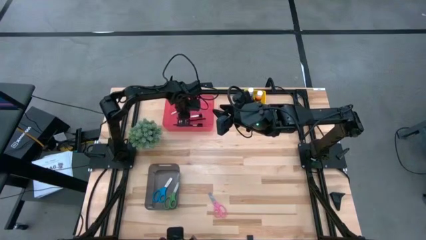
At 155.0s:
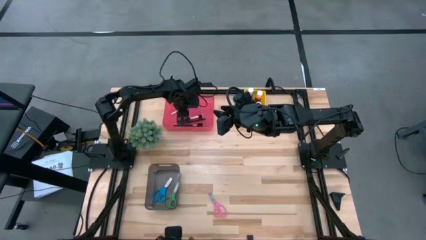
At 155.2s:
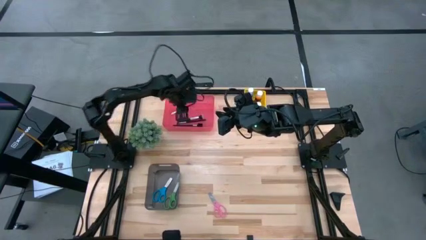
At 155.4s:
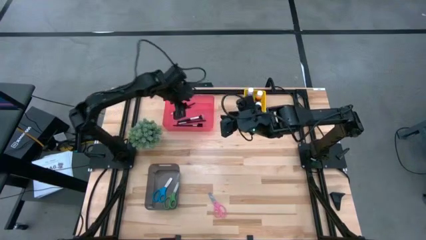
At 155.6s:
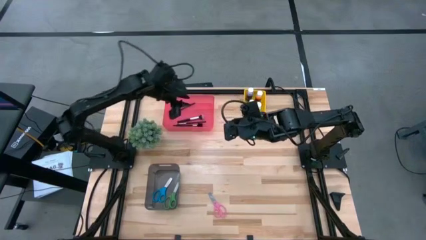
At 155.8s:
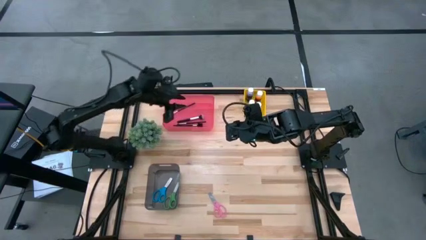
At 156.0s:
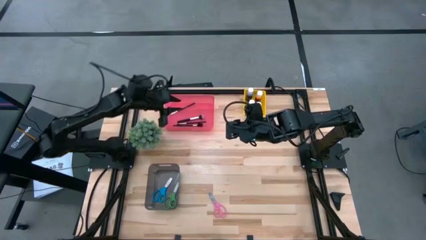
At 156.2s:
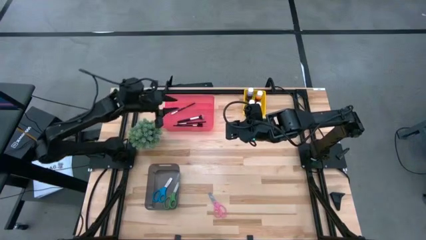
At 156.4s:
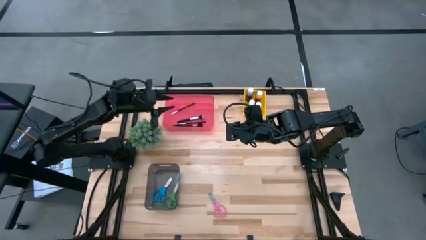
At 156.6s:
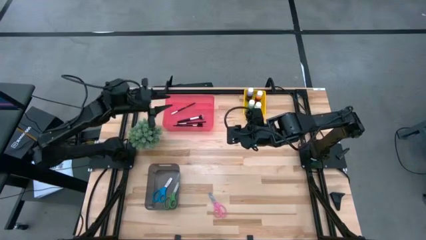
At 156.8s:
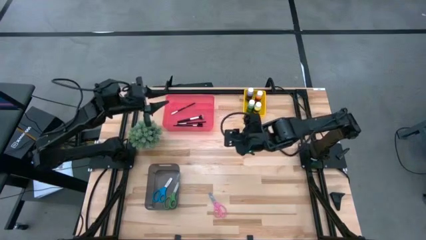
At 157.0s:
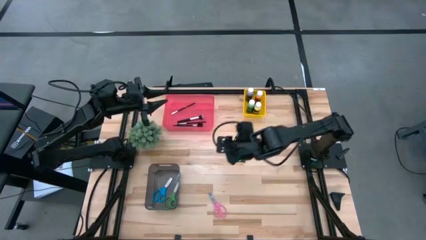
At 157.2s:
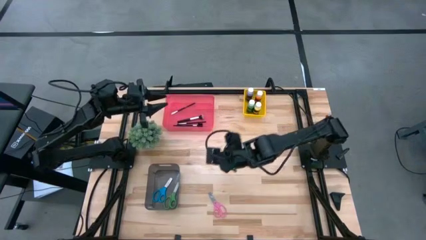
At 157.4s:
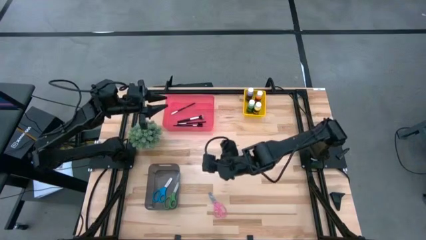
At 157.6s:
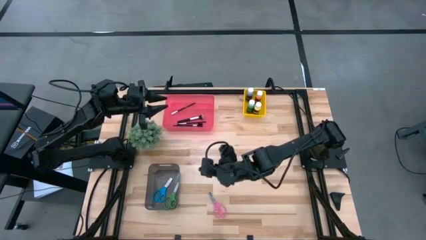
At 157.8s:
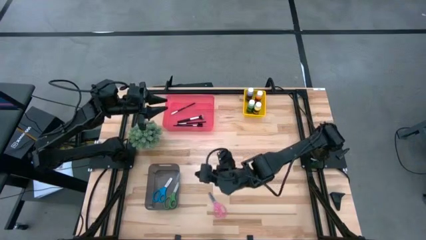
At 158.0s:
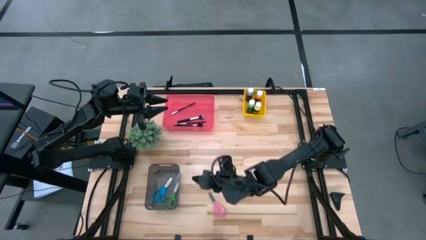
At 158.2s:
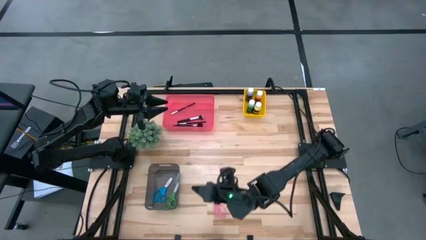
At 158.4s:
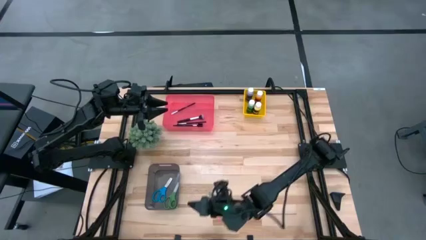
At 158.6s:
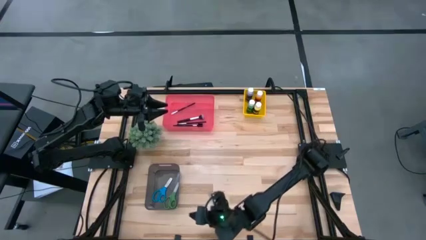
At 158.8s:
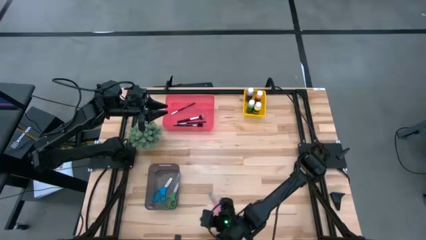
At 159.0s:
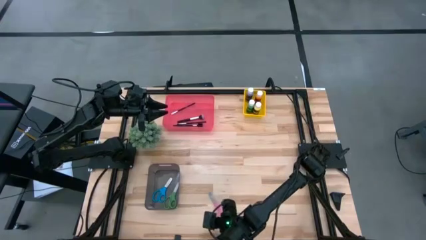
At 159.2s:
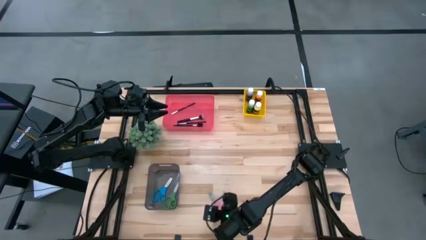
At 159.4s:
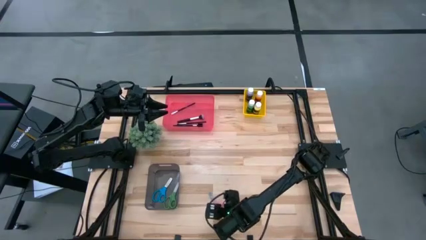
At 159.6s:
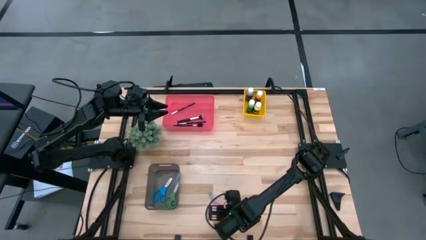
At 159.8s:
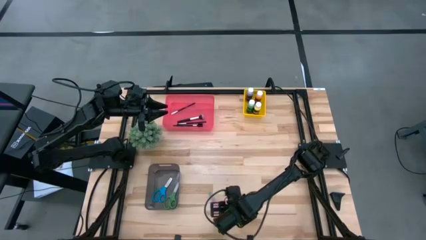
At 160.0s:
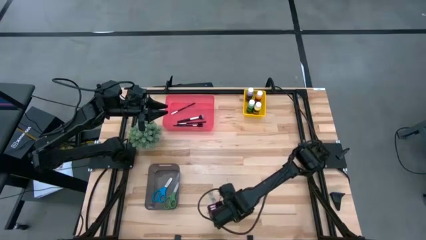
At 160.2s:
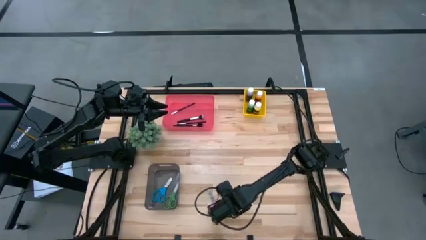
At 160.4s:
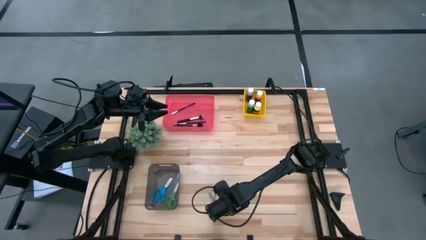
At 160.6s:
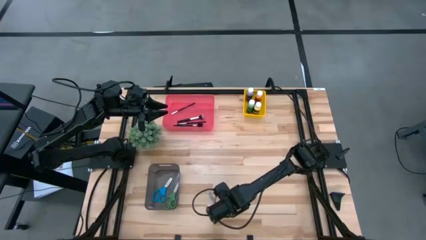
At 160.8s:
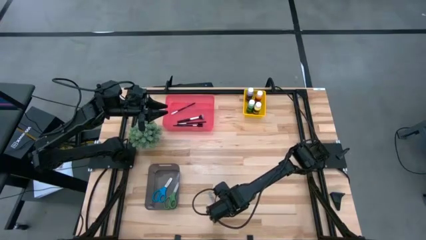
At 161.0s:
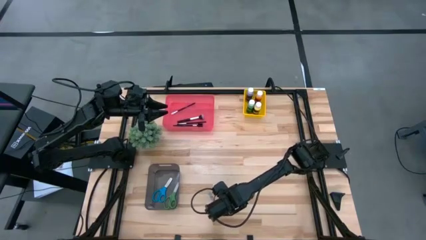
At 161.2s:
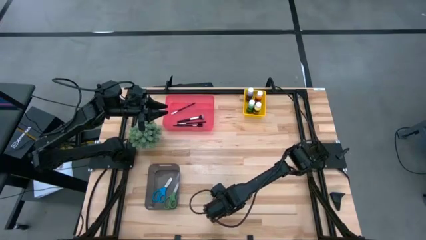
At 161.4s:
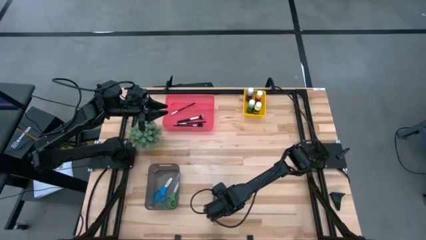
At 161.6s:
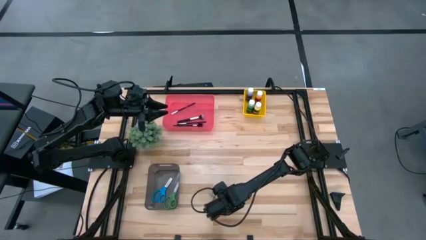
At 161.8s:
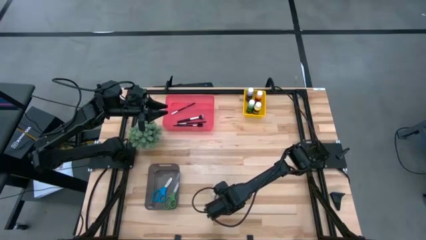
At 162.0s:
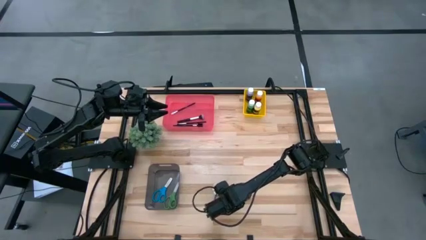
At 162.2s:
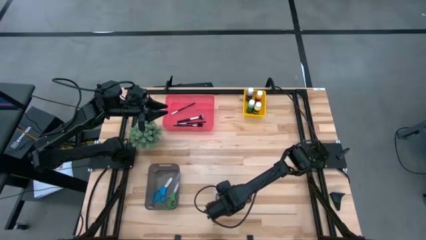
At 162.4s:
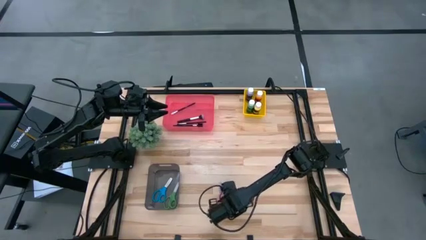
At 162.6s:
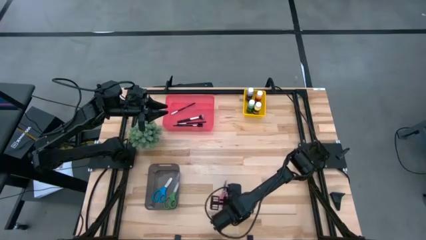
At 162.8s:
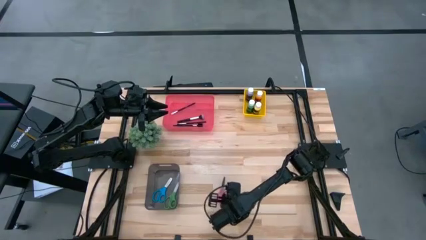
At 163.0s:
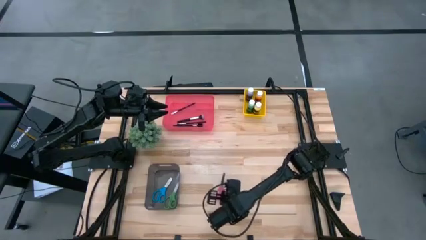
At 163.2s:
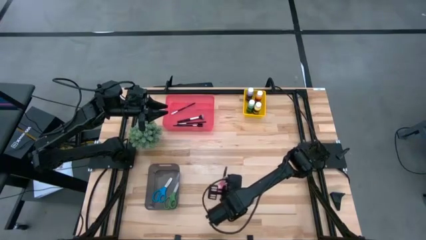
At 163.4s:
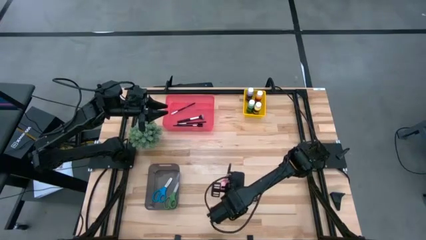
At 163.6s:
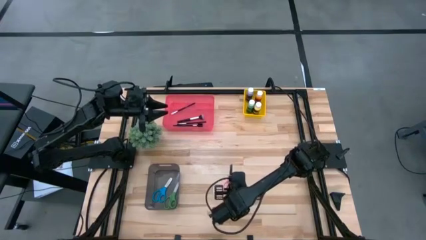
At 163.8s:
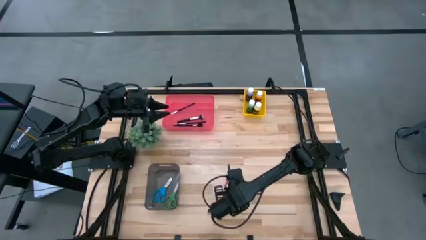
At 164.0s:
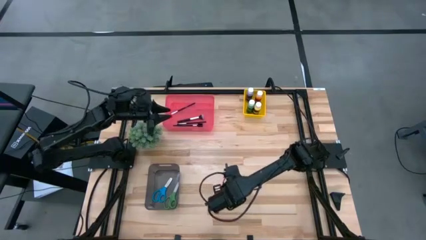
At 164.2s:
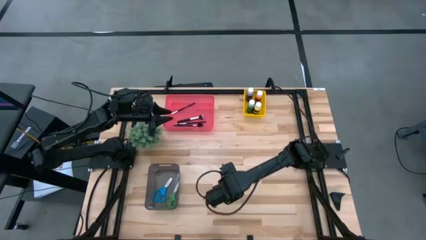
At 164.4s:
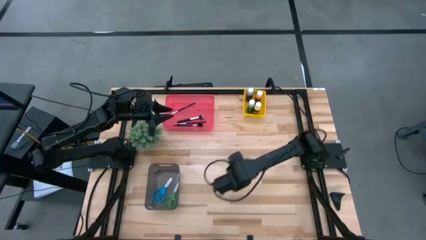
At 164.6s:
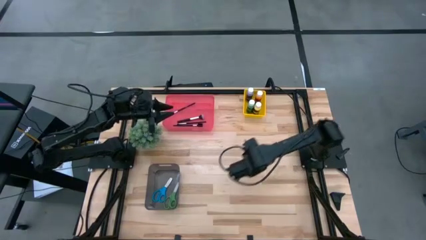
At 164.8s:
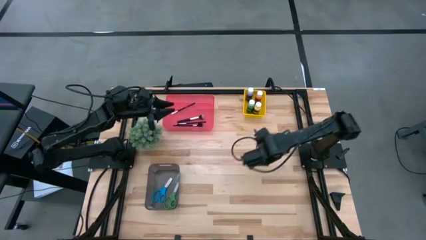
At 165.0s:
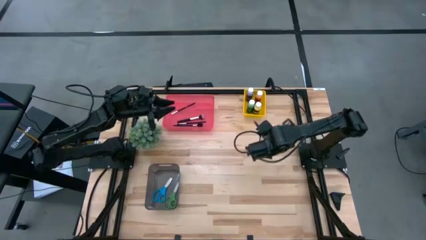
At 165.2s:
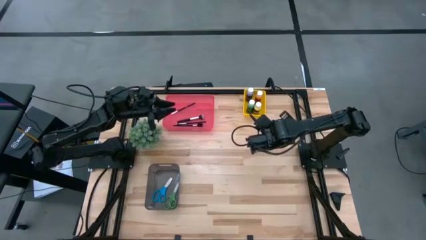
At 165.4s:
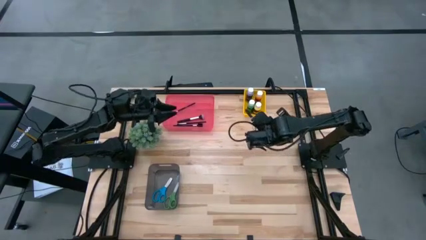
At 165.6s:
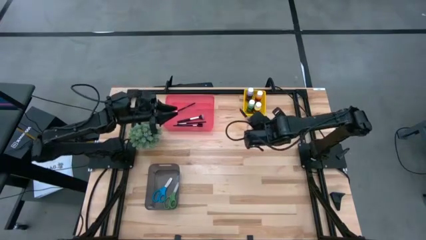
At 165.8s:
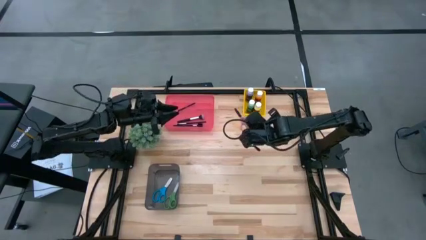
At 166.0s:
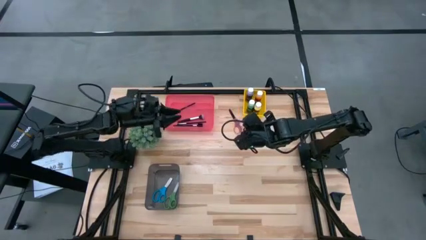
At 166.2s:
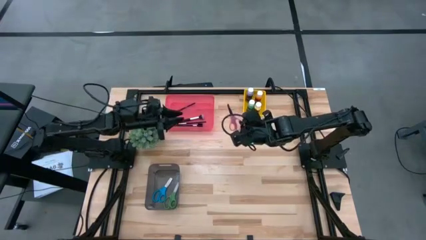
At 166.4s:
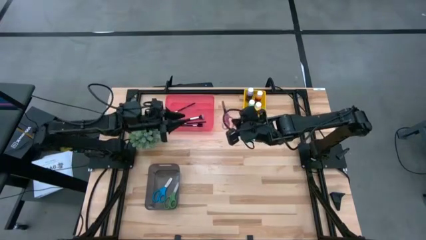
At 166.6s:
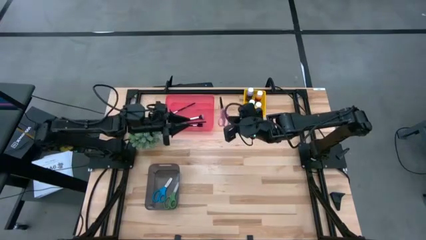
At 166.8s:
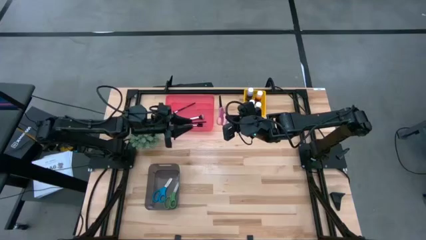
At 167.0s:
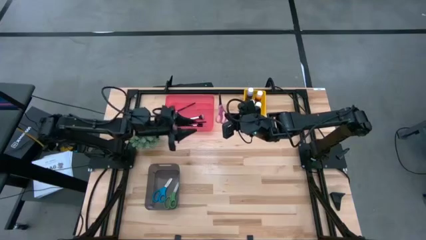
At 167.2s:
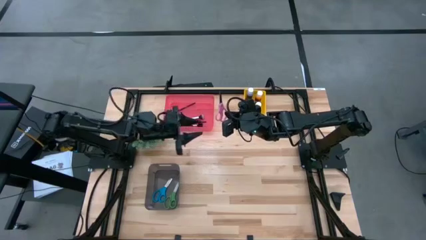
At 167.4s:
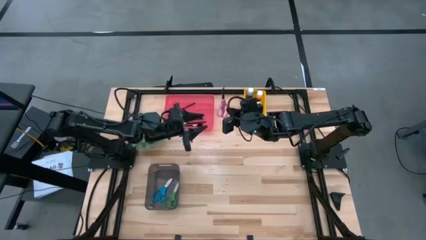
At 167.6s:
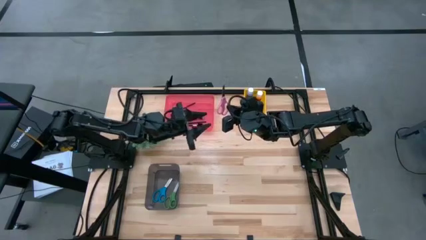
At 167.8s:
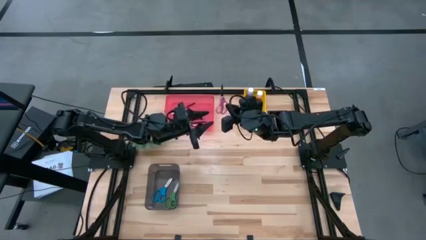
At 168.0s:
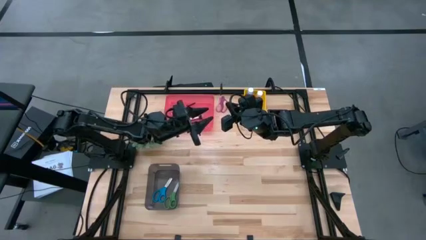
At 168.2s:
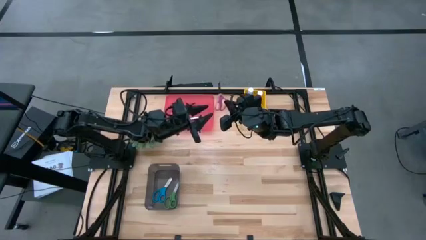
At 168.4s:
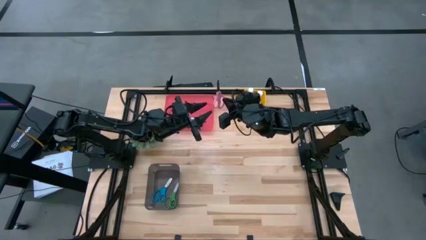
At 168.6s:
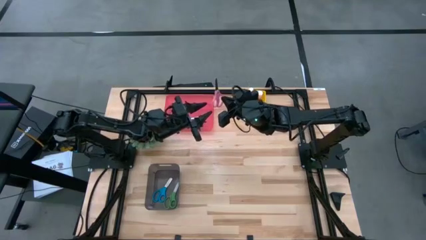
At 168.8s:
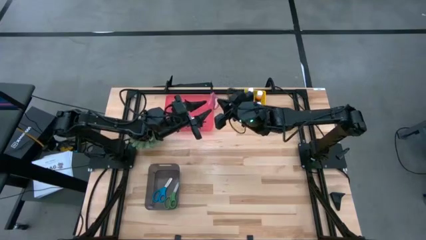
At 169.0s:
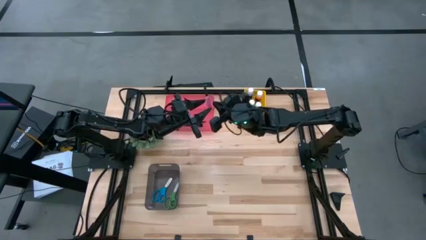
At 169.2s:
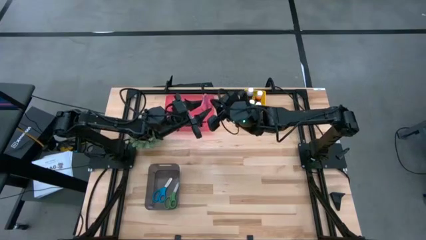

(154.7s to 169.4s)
Task: Pick & Place Paint Supplies
Put the pink scissors into the black bin

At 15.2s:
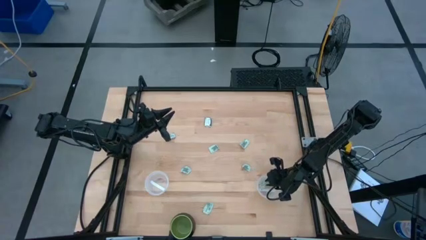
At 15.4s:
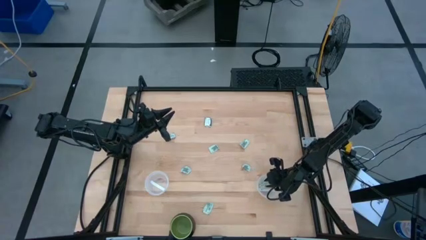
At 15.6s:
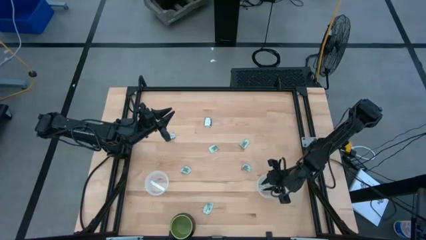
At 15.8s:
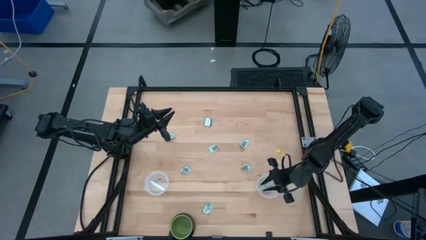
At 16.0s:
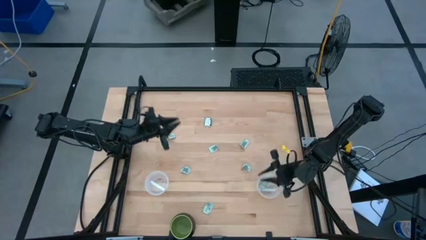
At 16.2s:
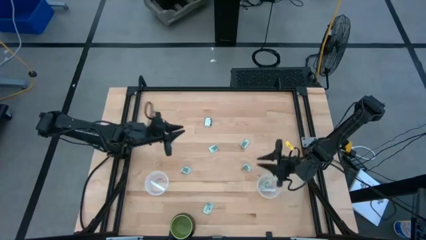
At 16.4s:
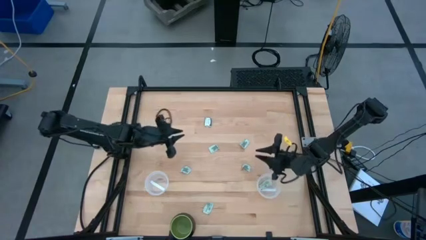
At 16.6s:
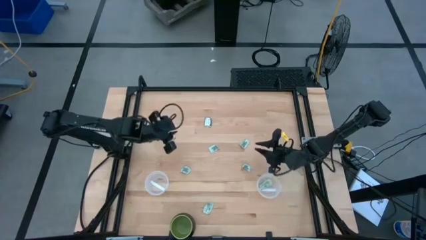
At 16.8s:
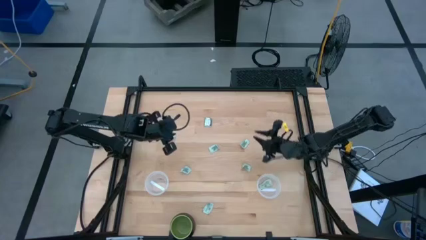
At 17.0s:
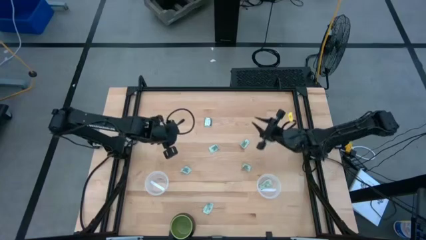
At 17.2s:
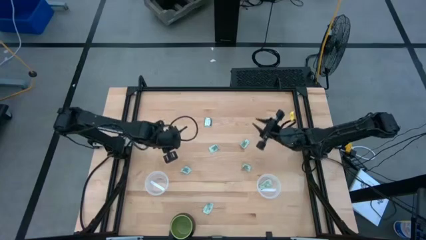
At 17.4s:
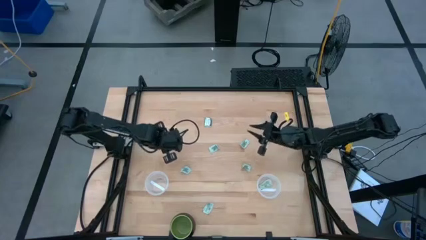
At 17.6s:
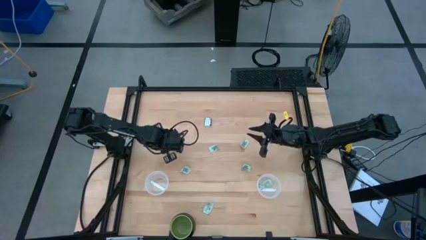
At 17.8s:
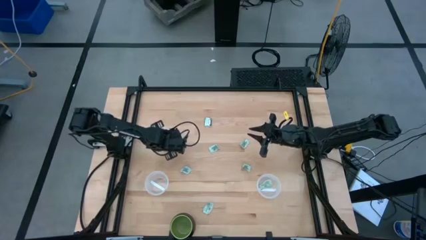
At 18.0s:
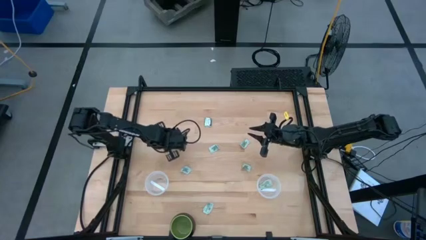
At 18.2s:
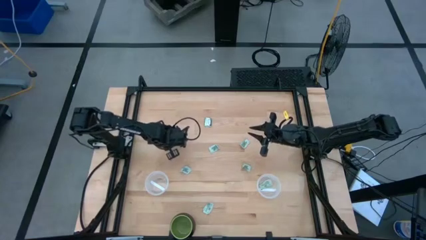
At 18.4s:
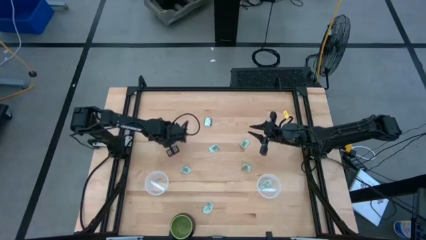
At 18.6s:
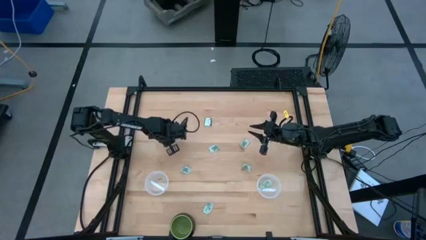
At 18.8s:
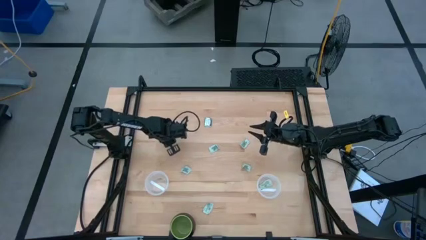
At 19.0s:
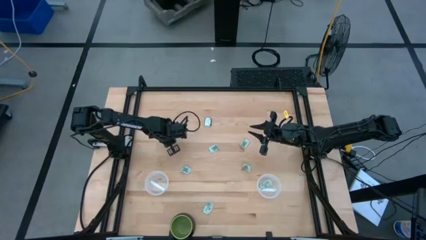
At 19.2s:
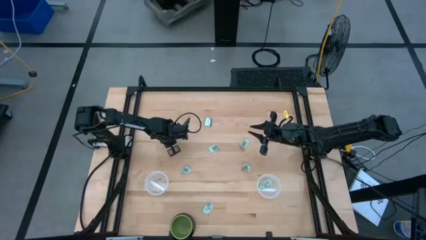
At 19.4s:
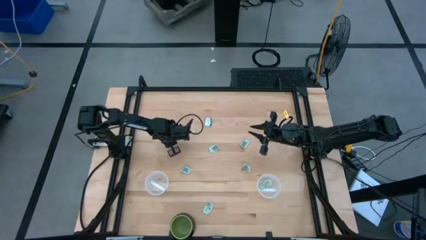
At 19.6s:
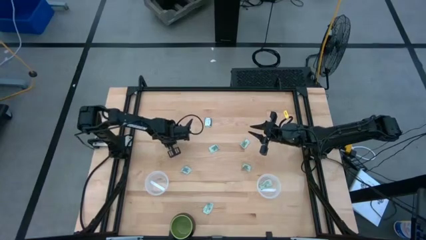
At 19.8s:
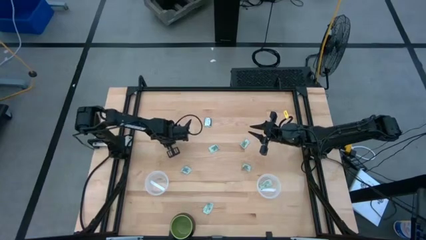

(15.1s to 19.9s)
Task: Pick and place Stevia / Truvia into bins
Put the white stevia packet into the left transparent container
